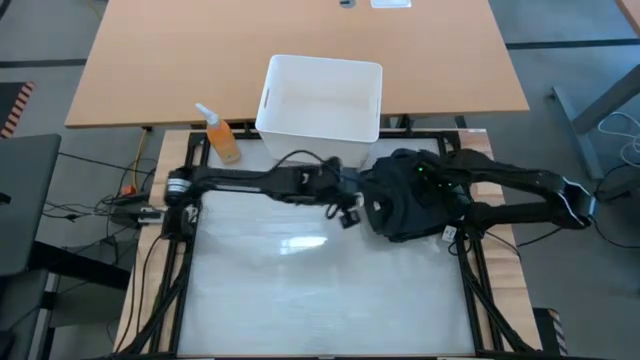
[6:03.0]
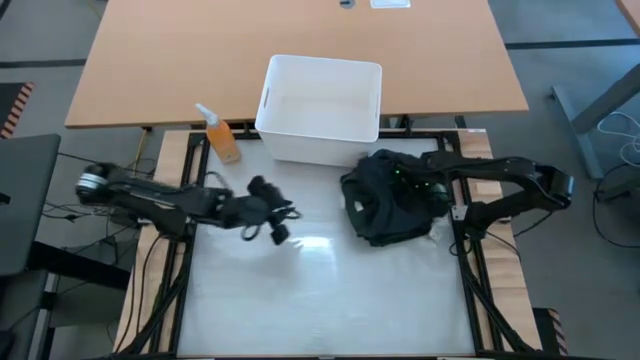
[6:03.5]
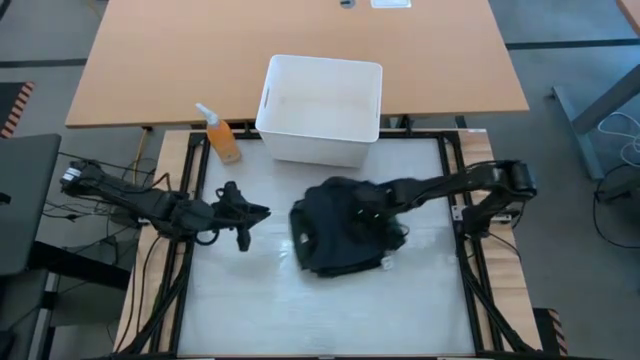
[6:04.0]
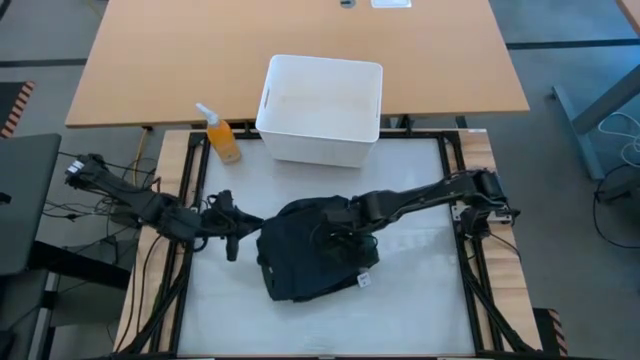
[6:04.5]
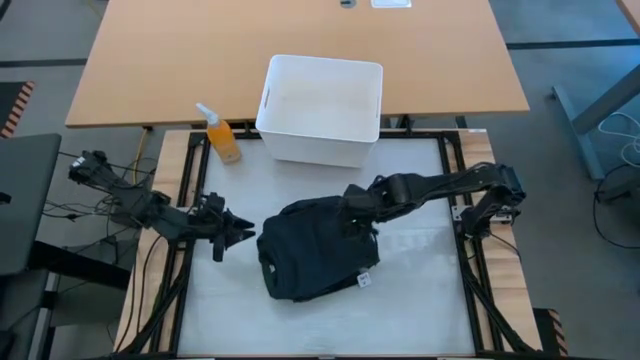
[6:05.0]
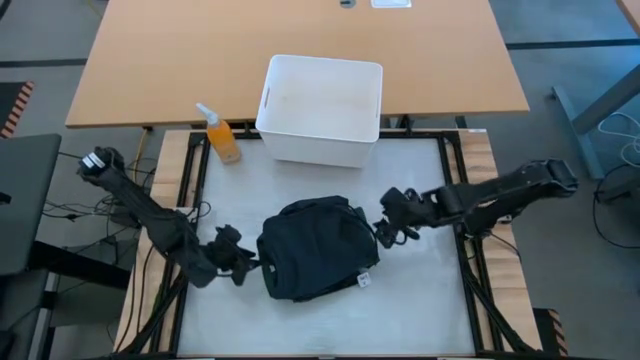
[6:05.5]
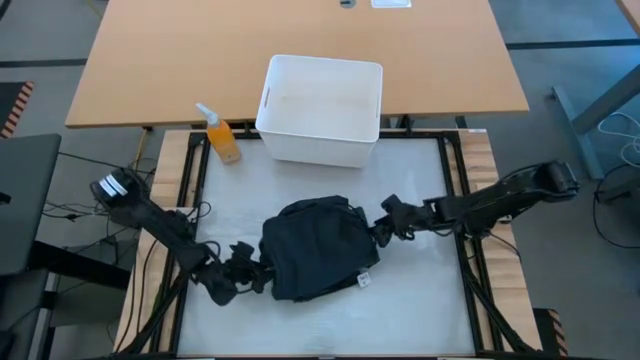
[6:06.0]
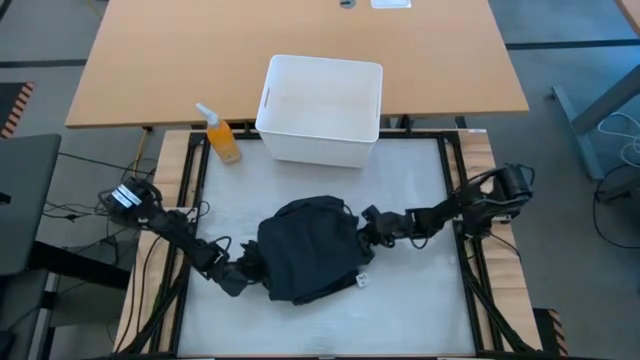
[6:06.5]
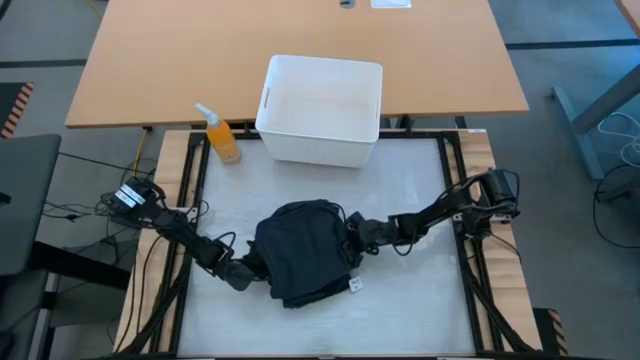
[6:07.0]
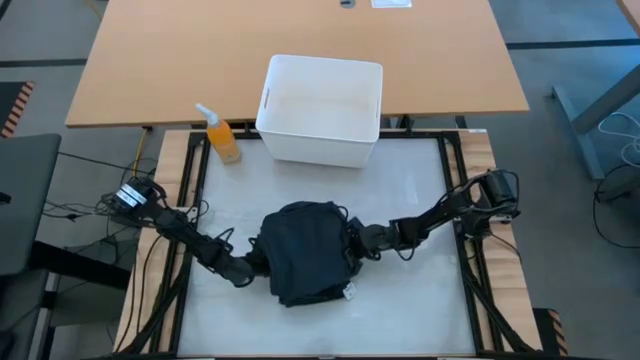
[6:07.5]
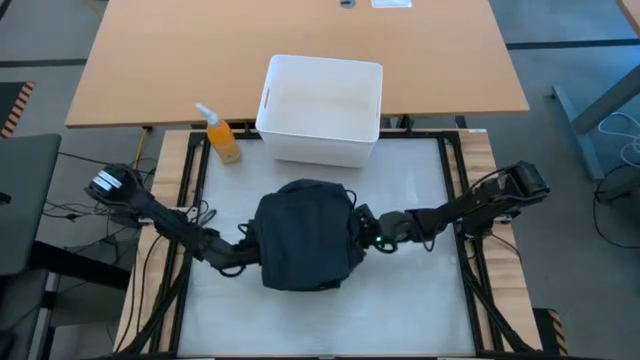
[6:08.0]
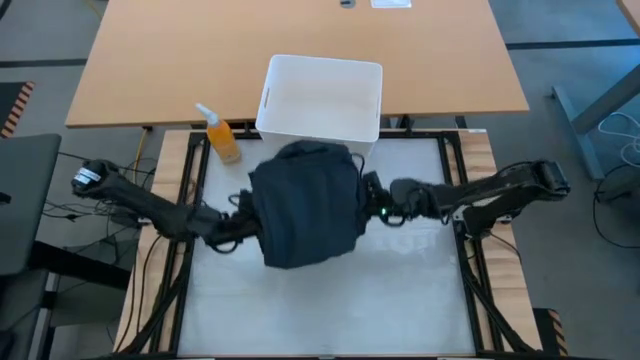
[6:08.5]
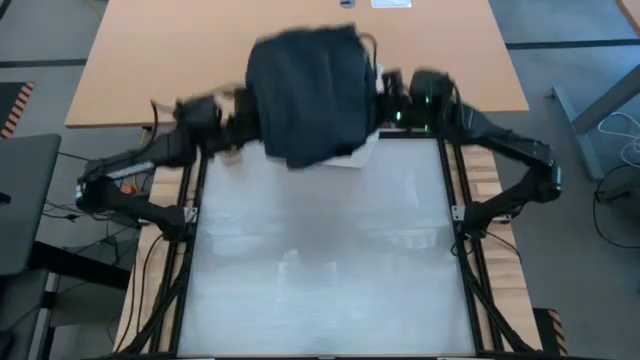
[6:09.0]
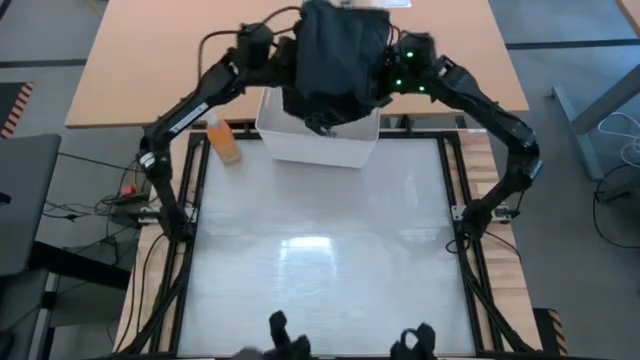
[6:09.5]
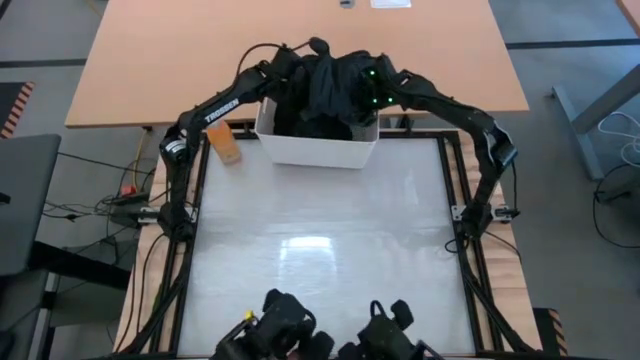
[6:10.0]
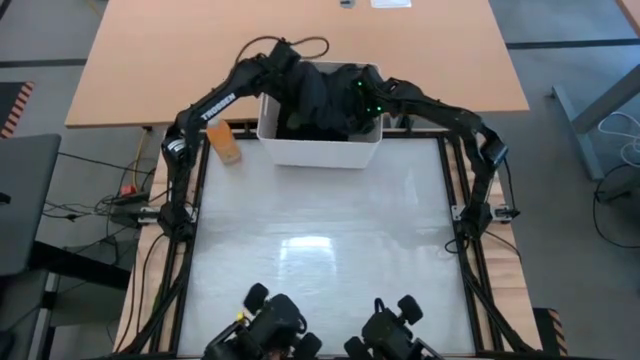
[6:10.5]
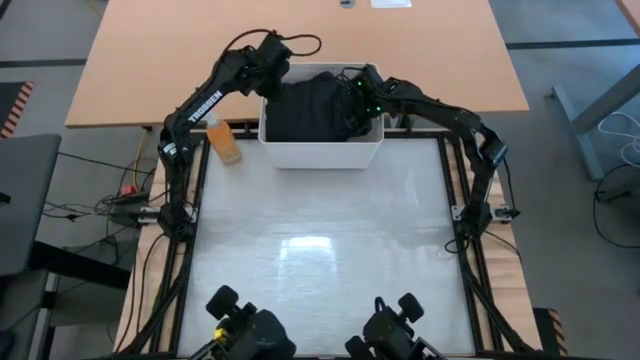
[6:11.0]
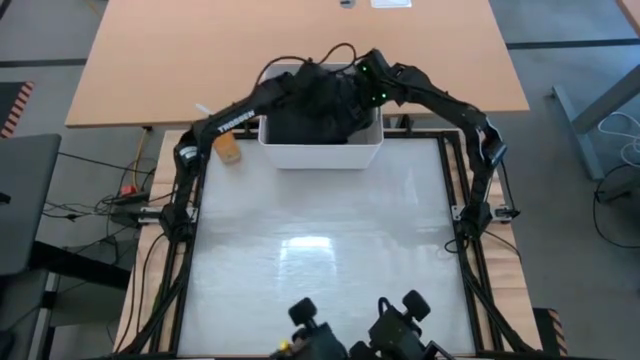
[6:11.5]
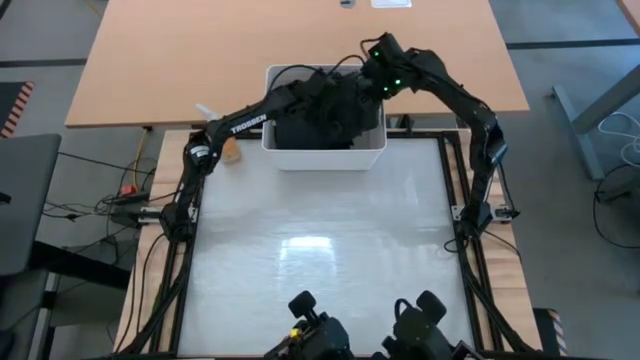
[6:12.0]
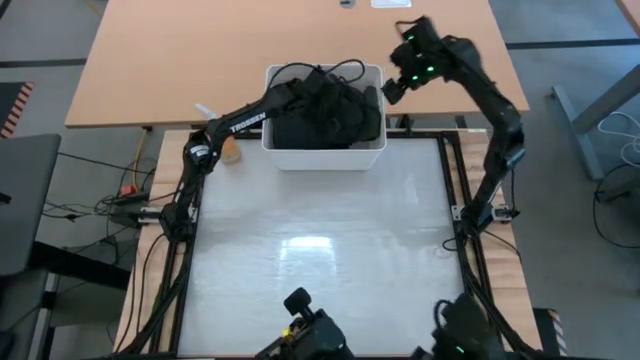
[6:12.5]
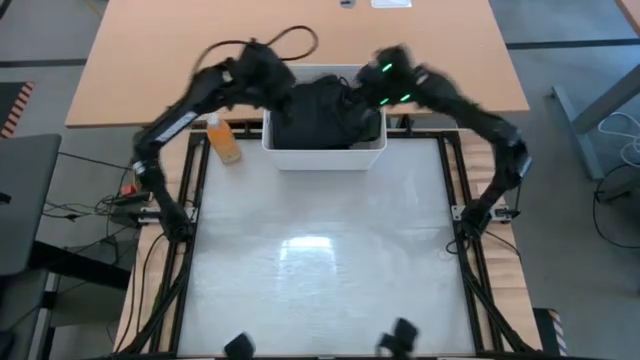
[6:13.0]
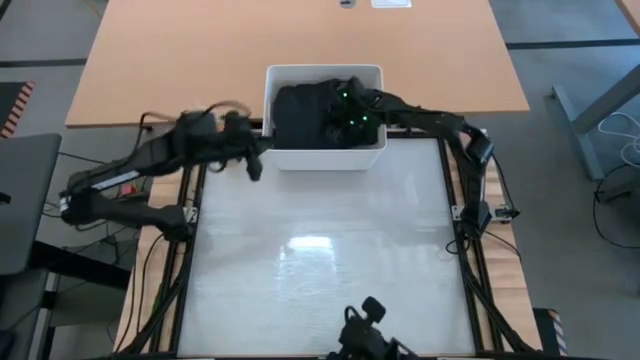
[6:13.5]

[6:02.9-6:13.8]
Task: Fold laundry
Put the folded clothes into the white laundry bin

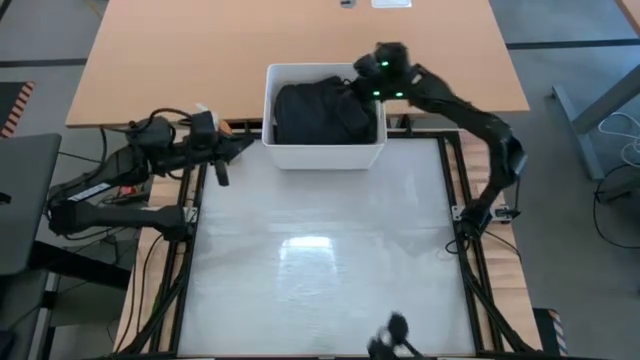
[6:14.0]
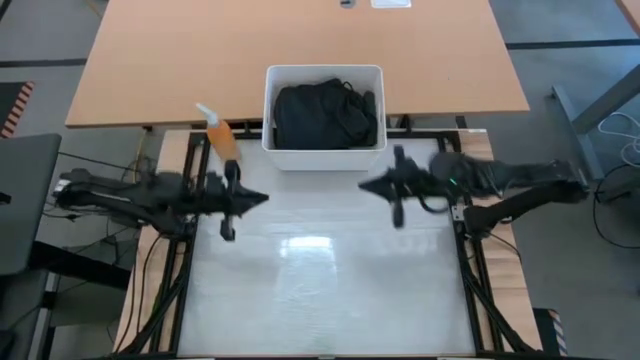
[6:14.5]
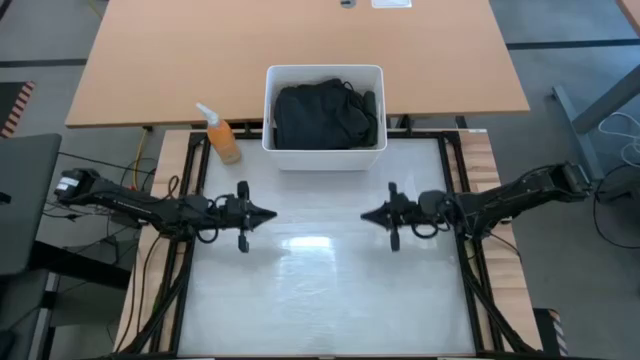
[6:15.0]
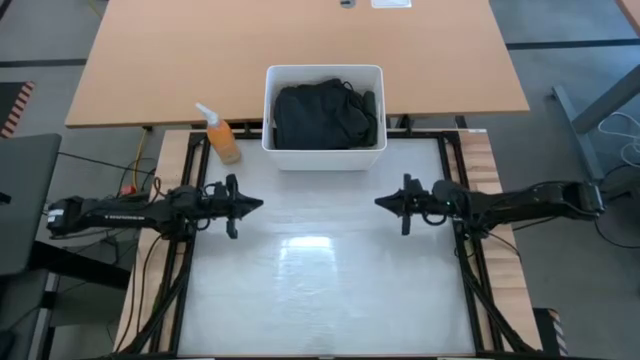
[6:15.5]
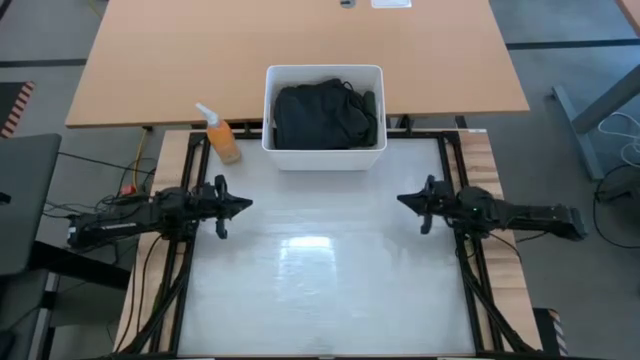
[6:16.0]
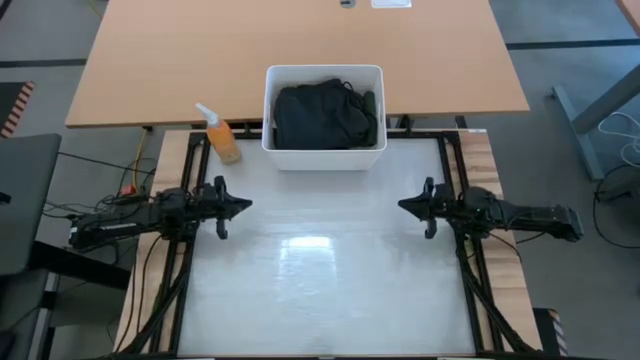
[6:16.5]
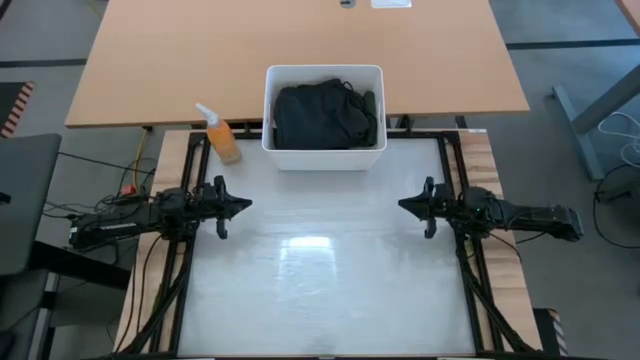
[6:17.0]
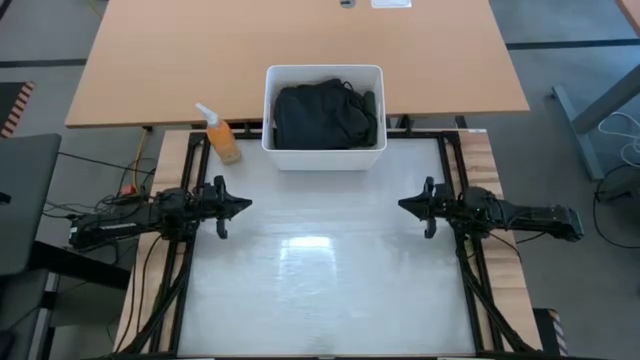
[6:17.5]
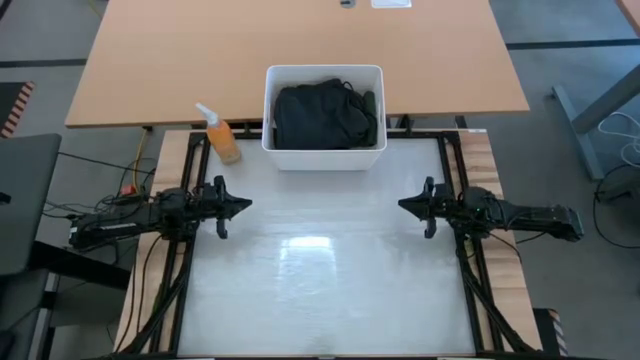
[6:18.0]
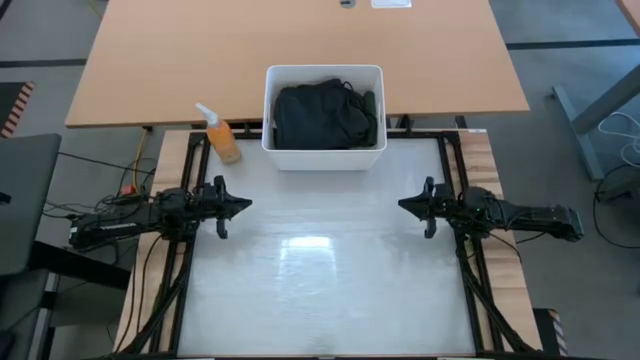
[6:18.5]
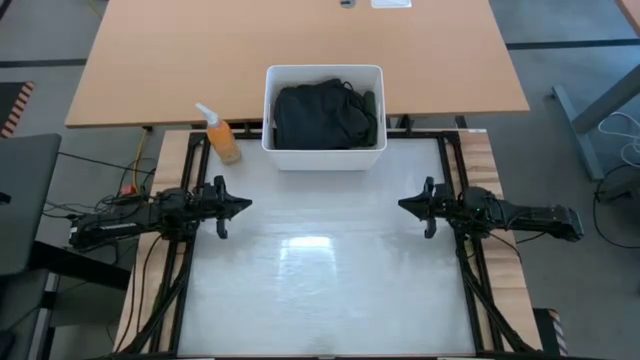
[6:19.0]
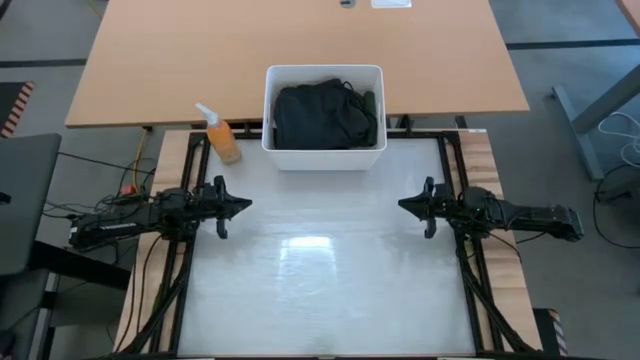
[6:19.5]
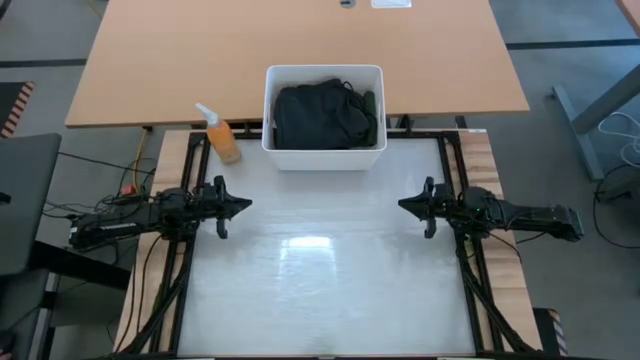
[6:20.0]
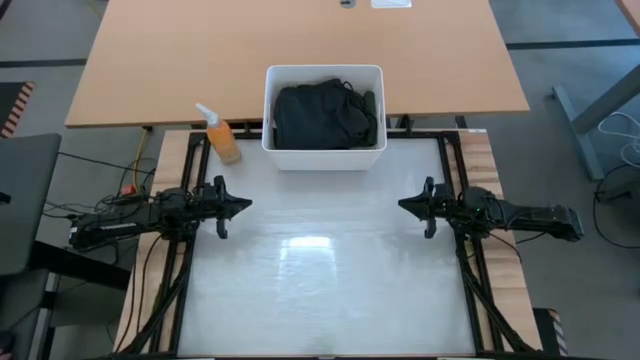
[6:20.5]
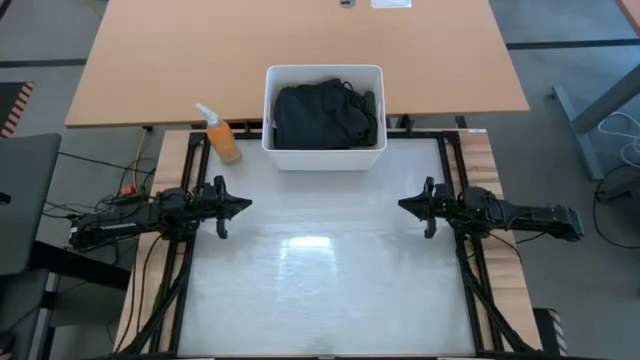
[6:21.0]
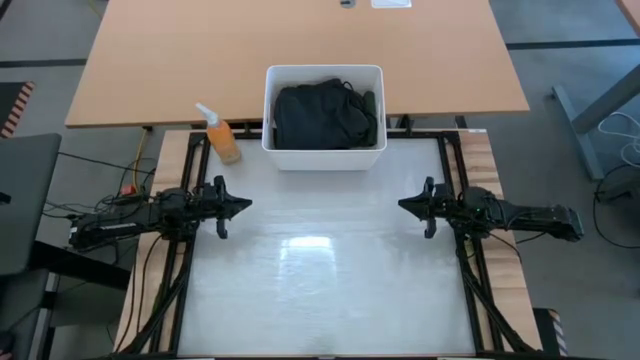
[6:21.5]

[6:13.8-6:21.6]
Return to Home Position
